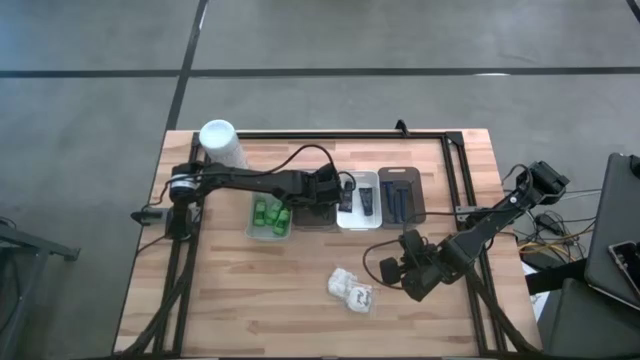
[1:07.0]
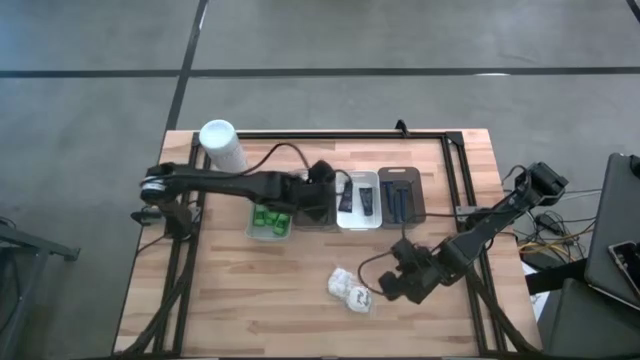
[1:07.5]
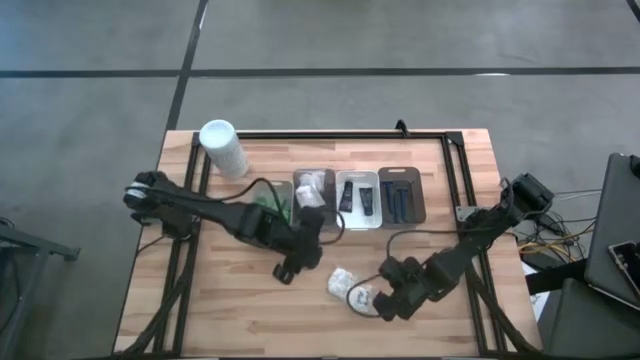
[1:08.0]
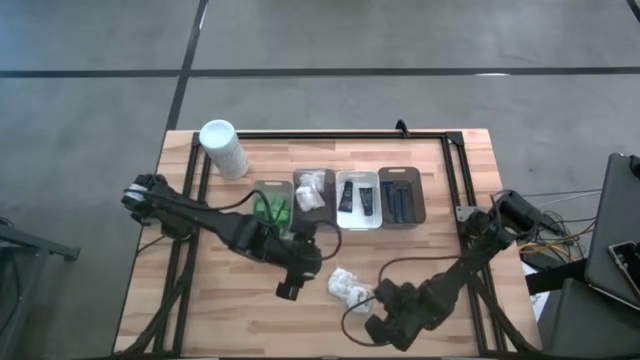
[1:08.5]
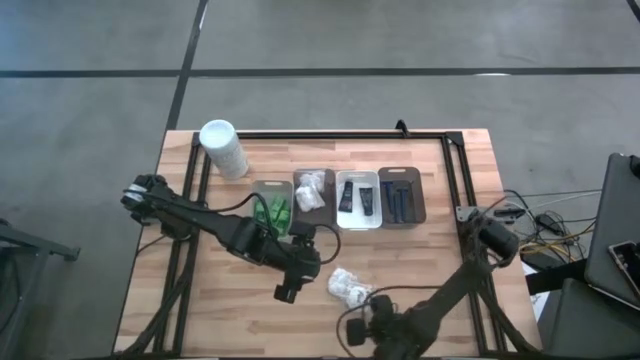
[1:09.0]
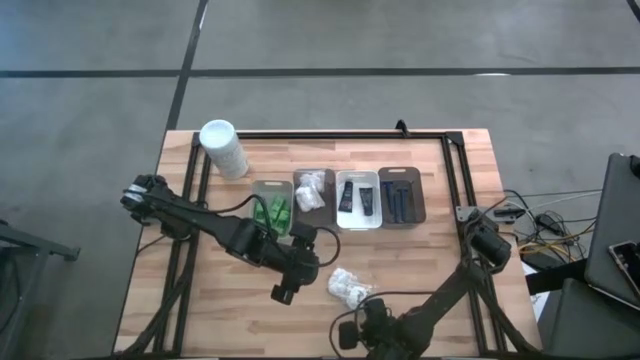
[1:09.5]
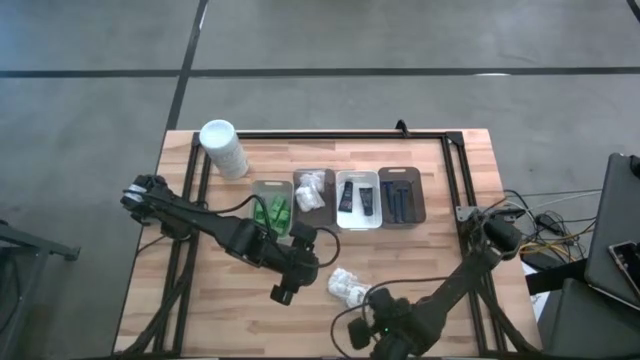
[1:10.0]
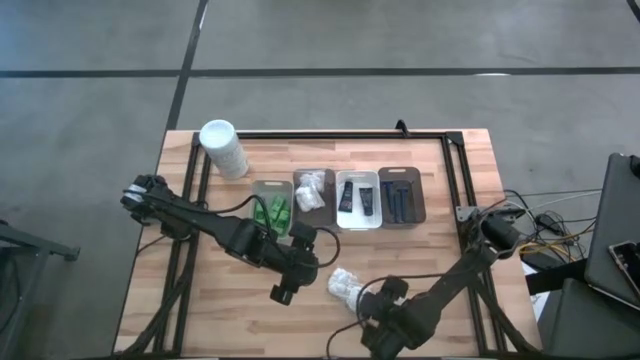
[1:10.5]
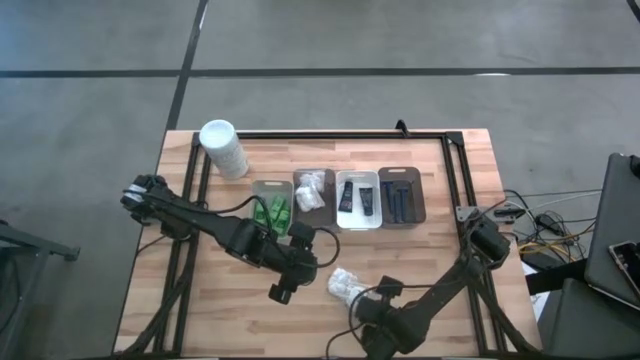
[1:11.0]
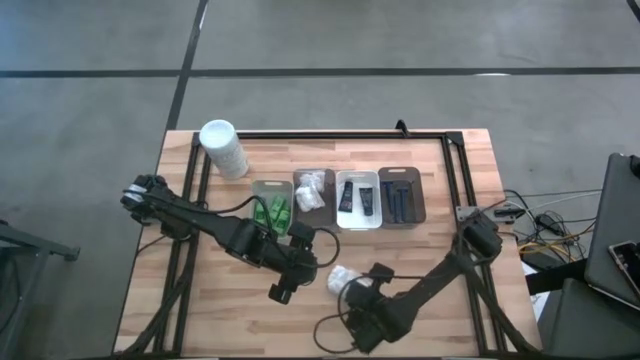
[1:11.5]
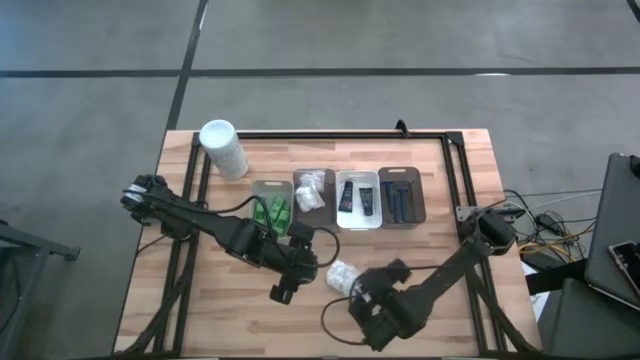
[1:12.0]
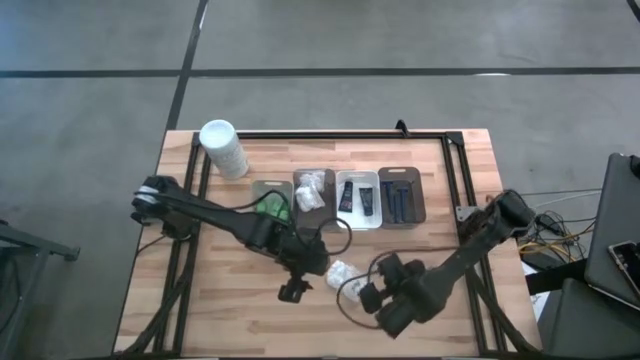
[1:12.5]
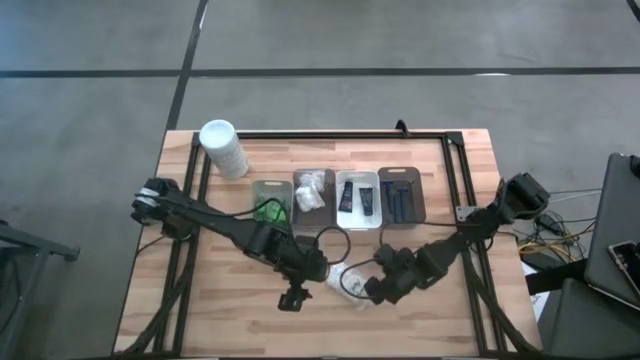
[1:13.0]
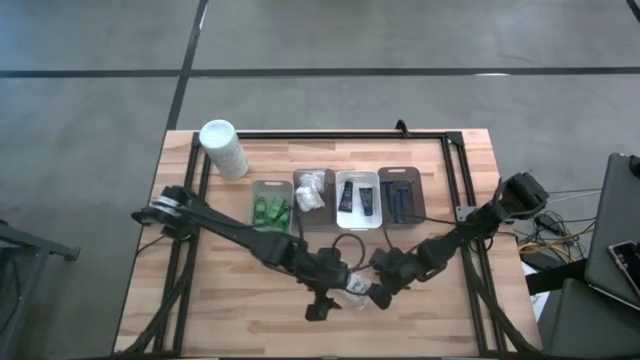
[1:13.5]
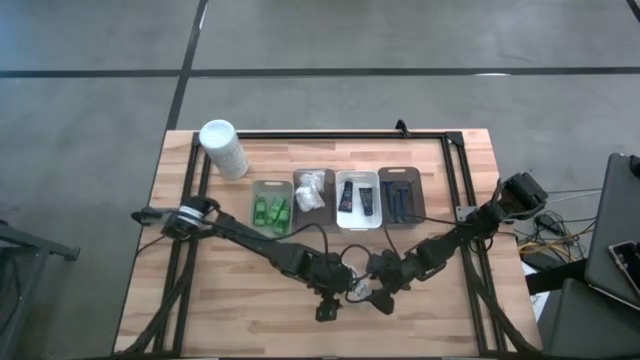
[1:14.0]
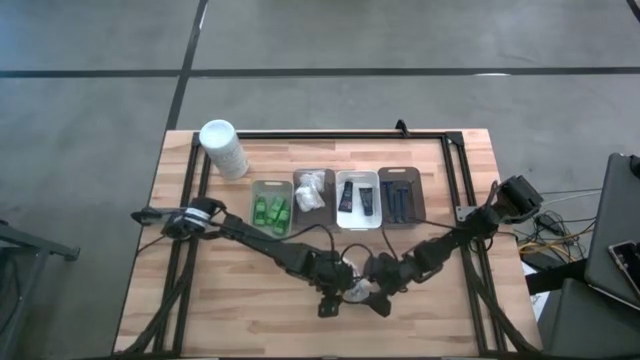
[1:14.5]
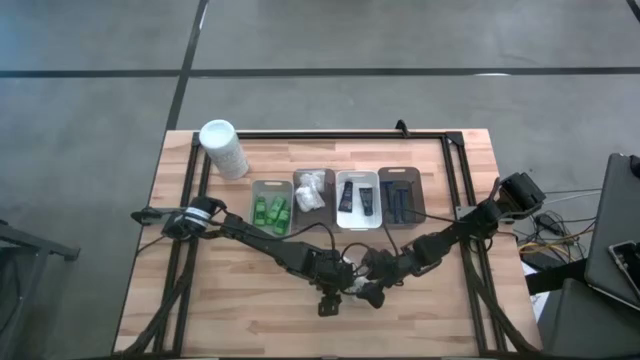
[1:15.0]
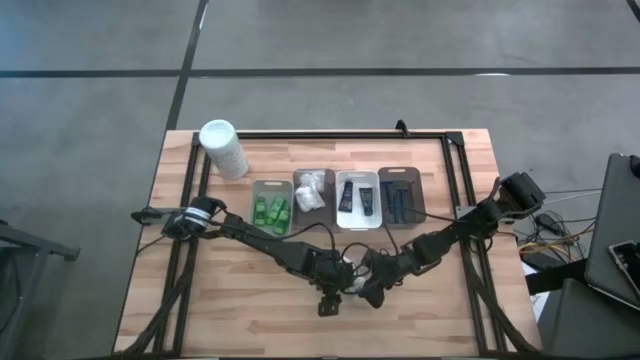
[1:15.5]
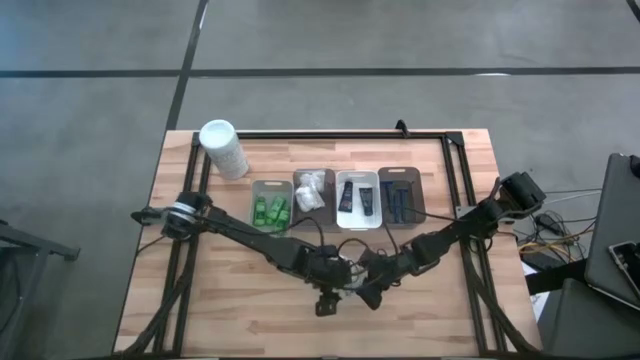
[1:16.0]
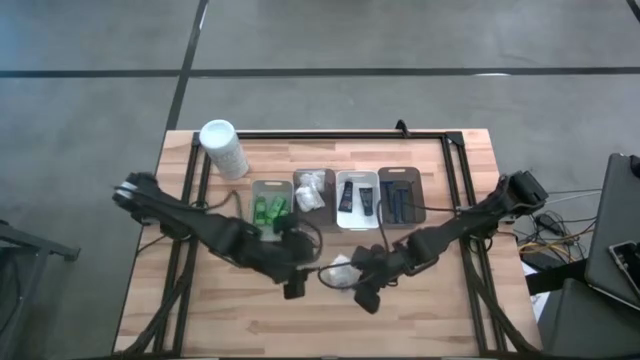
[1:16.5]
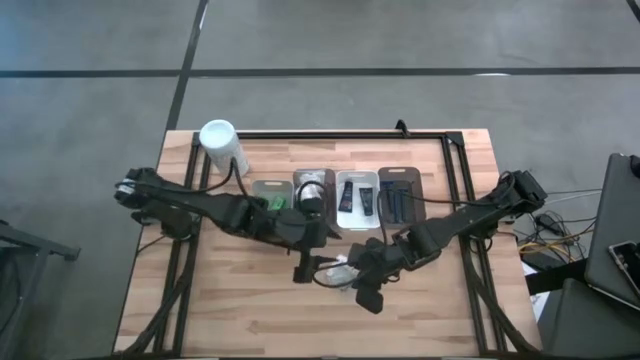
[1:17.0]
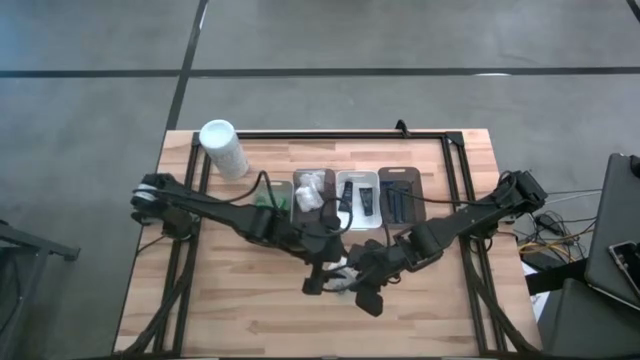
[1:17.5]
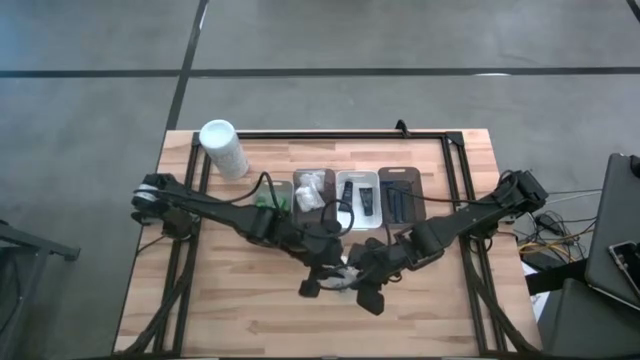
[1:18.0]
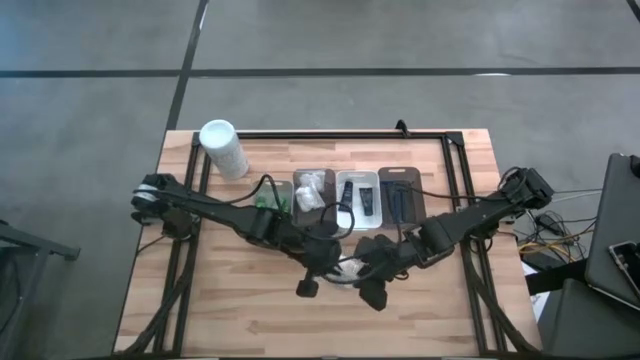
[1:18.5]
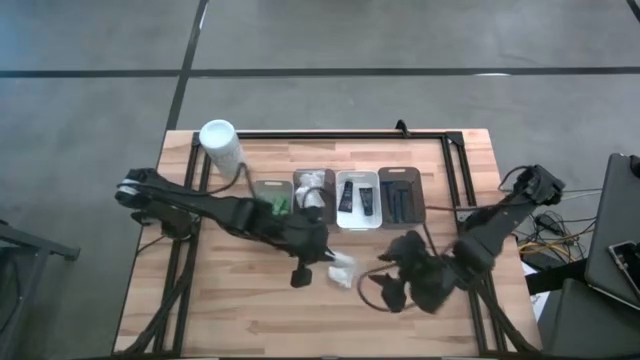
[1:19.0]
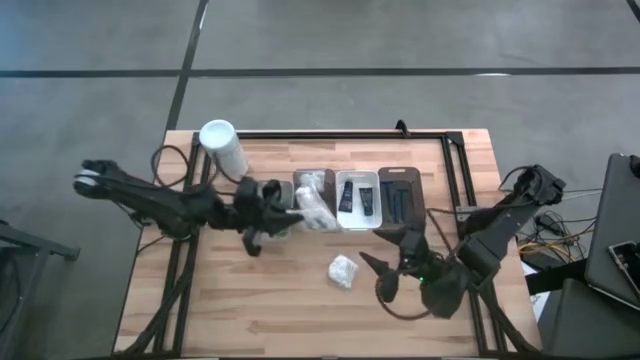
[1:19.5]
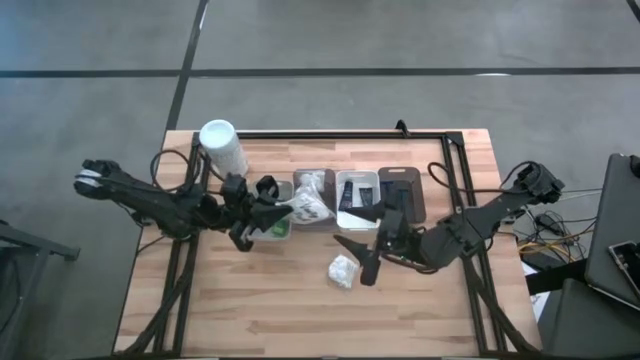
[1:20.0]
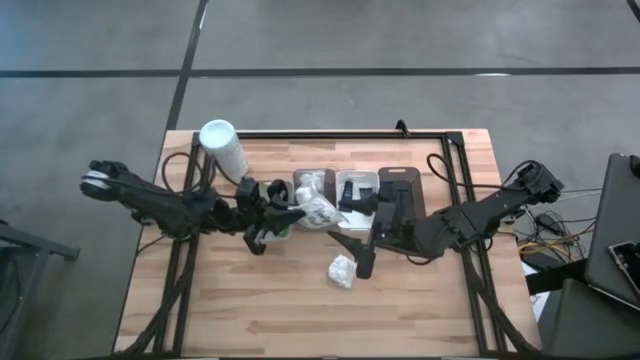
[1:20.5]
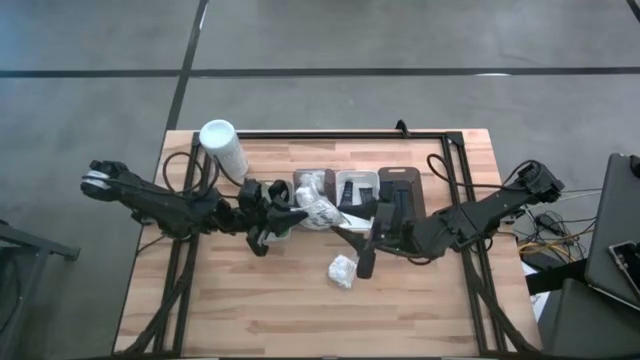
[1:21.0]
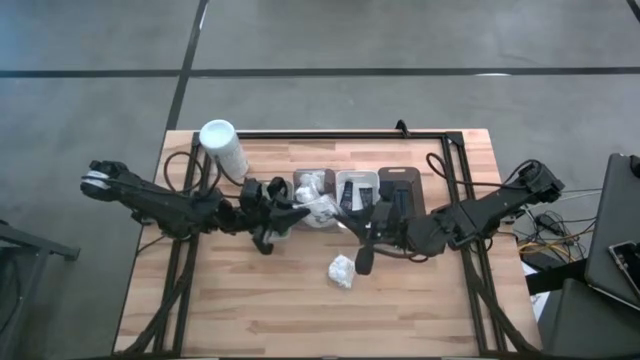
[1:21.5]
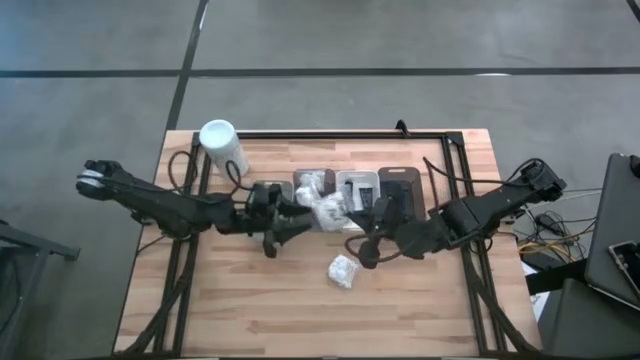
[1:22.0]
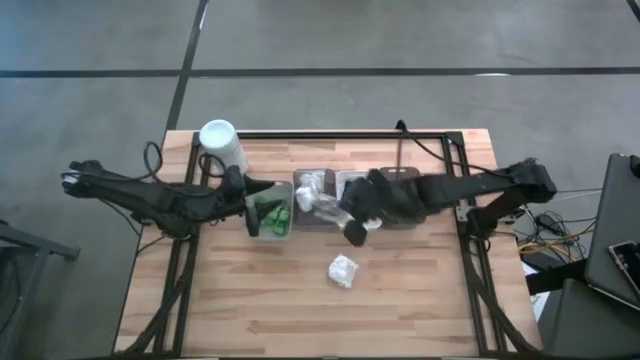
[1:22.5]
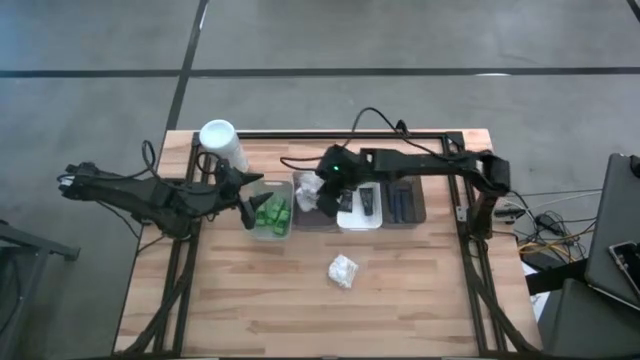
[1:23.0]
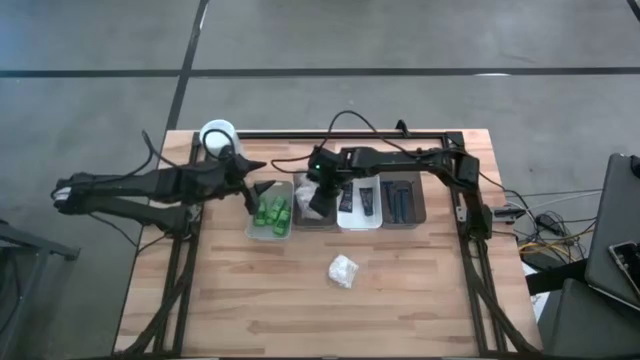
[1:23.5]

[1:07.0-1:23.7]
Task: Pick & Place Travel size toiletries
Put the bottom cotton pack into the left black bin

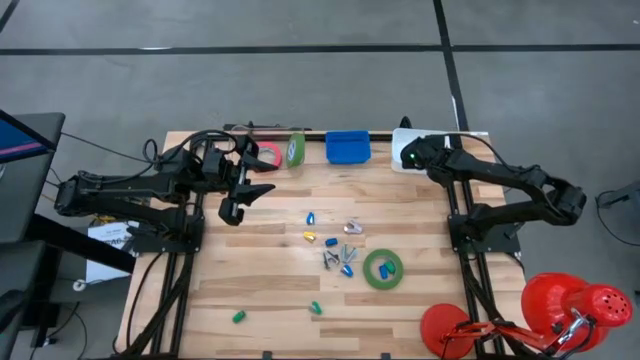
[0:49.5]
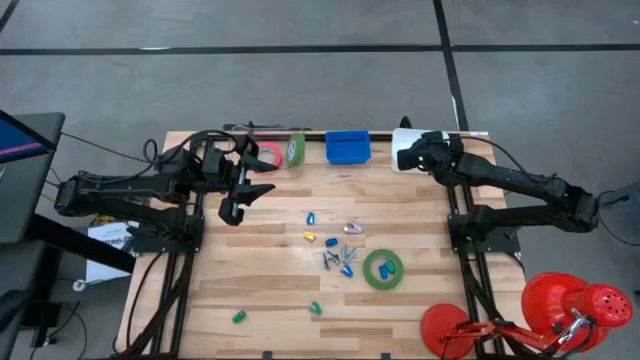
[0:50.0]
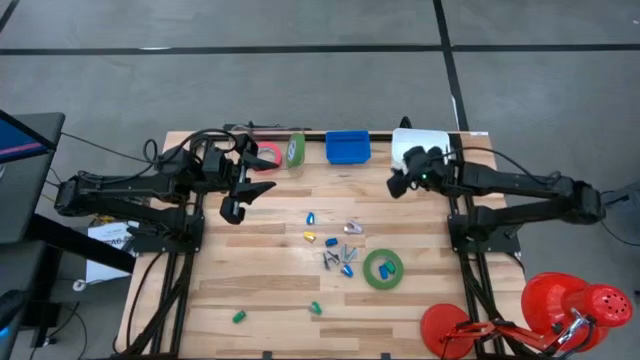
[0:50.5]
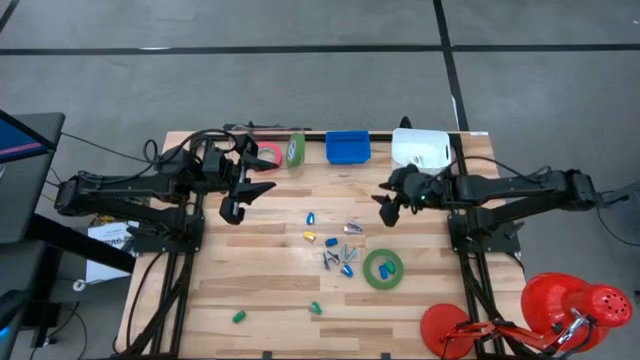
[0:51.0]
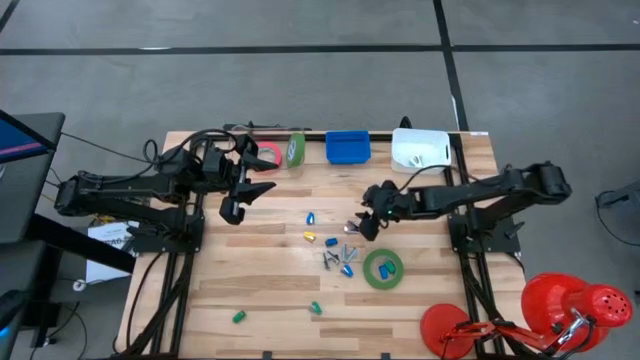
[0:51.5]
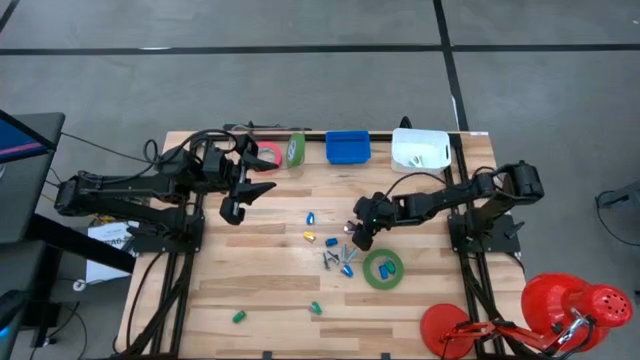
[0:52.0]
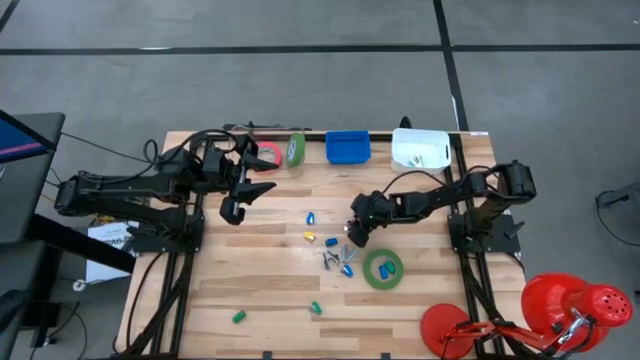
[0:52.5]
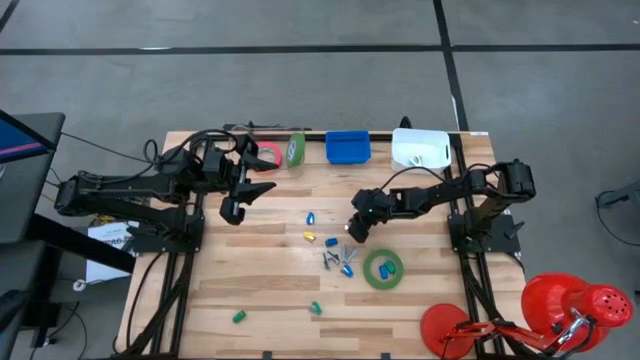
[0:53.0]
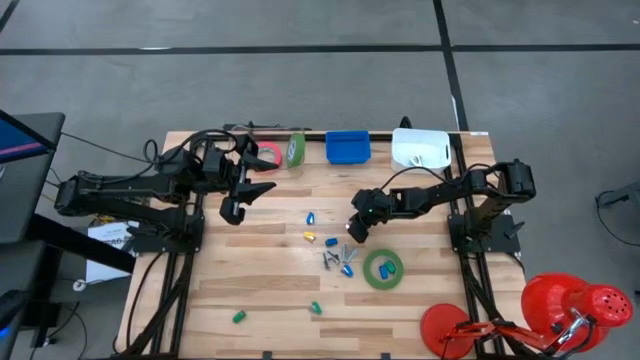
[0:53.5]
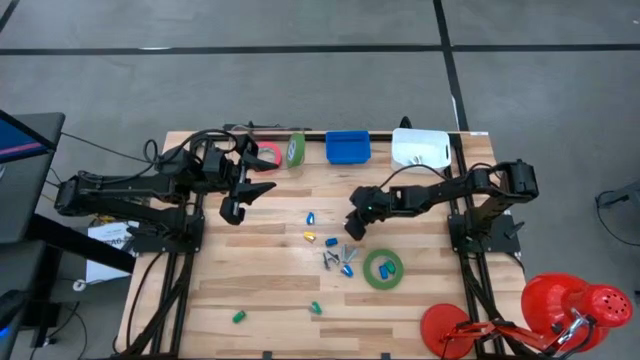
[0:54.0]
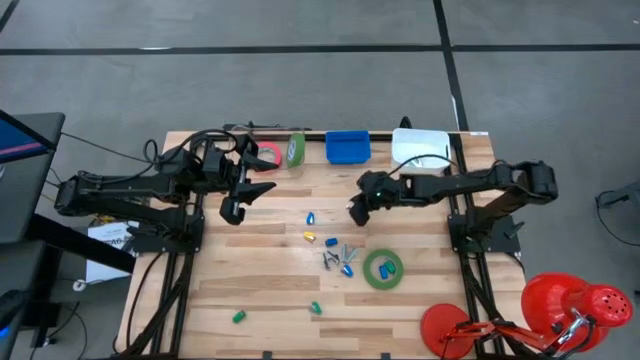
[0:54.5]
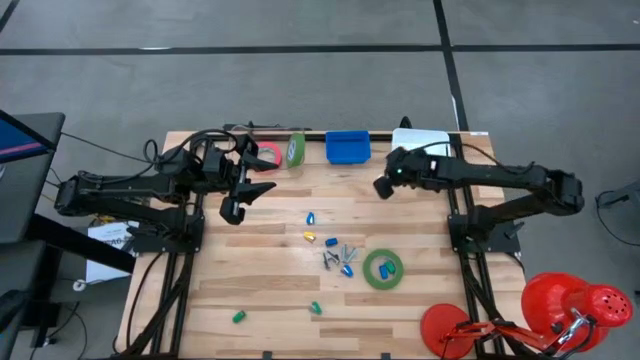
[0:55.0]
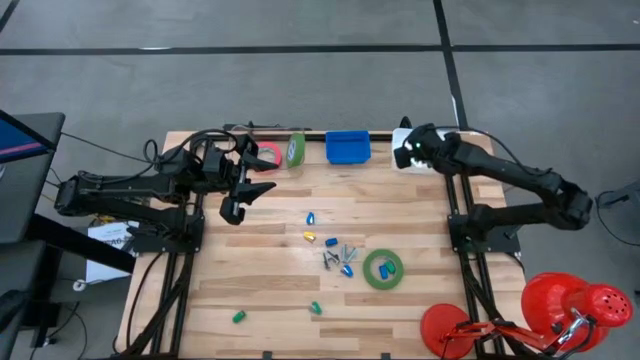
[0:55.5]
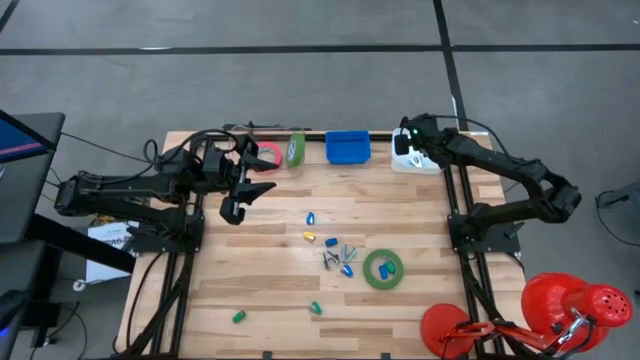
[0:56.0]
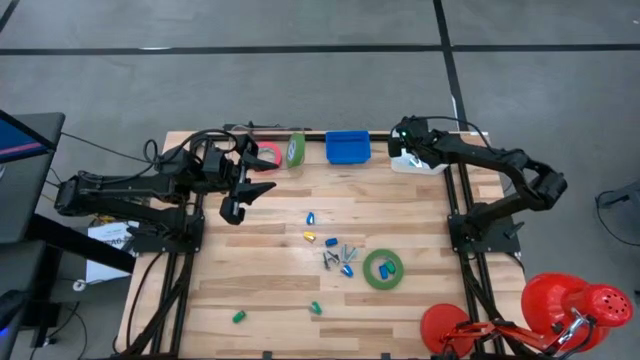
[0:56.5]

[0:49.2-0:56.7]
Task: Pick and place Stapler, Stapler remover, tape
Put the purple staple remover into the white bin
